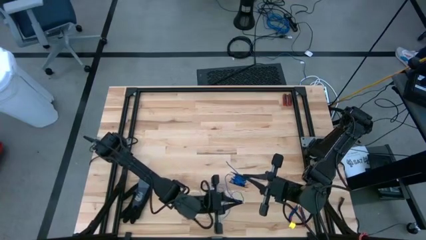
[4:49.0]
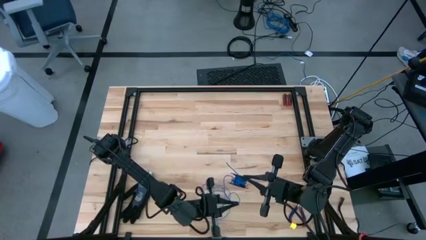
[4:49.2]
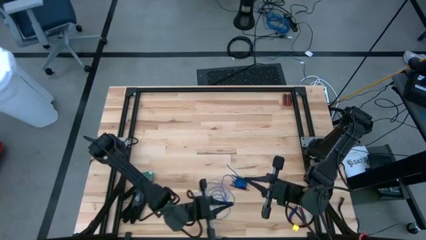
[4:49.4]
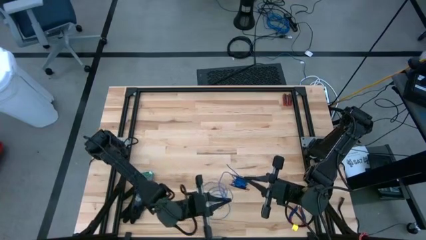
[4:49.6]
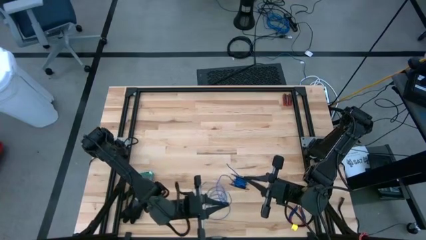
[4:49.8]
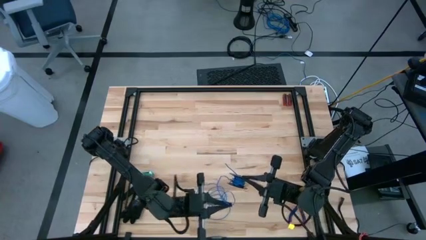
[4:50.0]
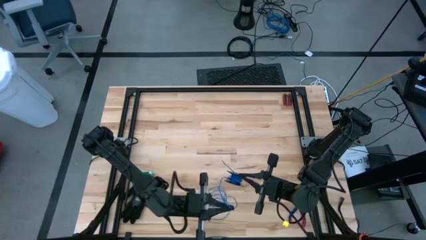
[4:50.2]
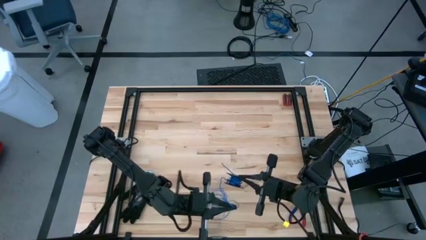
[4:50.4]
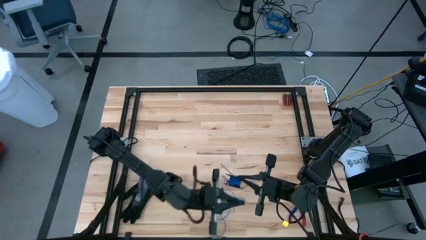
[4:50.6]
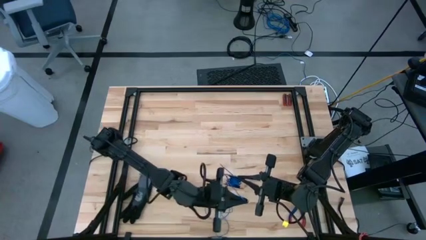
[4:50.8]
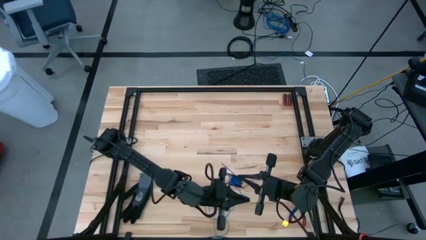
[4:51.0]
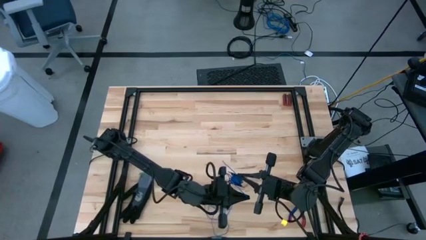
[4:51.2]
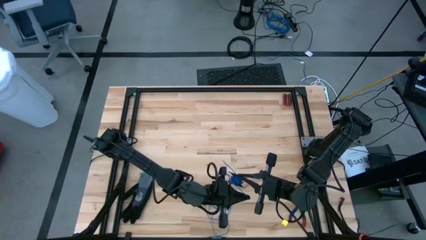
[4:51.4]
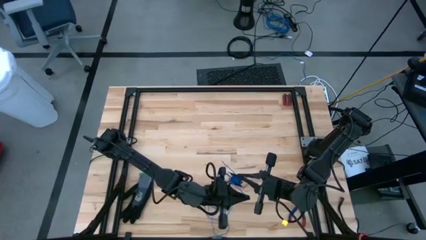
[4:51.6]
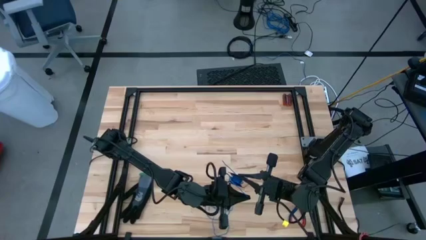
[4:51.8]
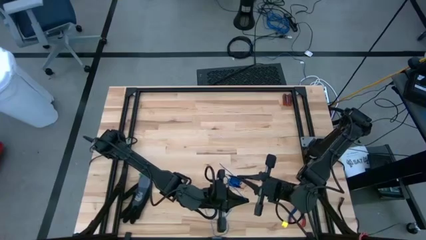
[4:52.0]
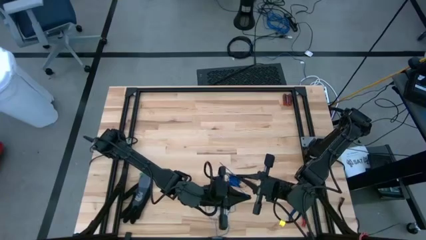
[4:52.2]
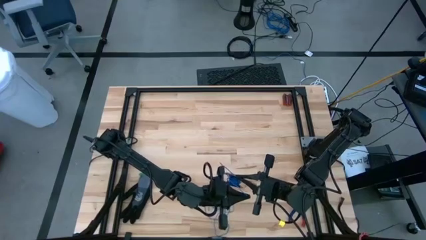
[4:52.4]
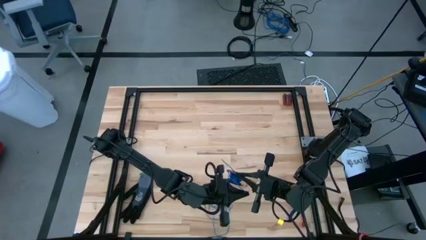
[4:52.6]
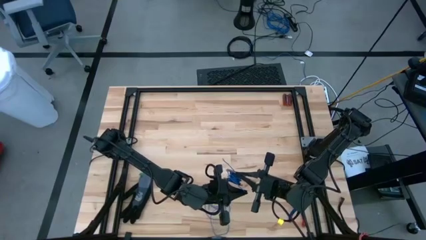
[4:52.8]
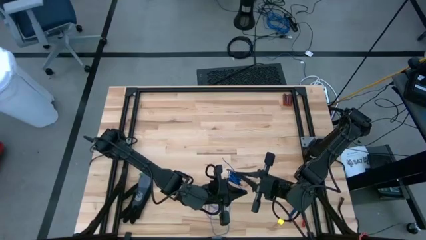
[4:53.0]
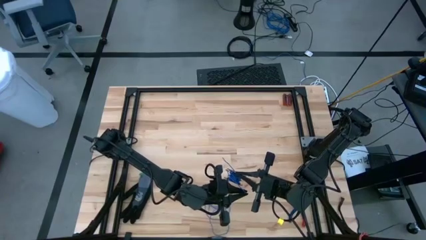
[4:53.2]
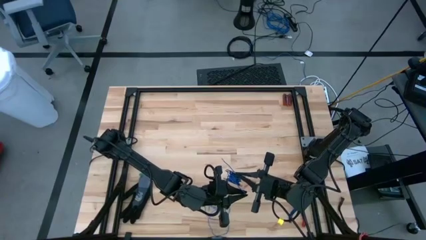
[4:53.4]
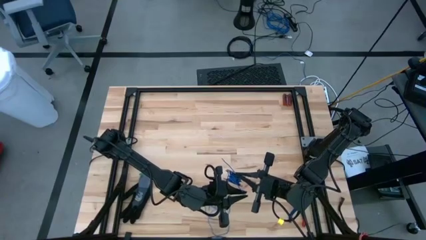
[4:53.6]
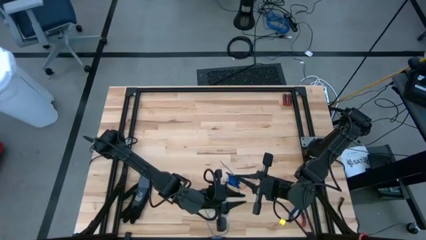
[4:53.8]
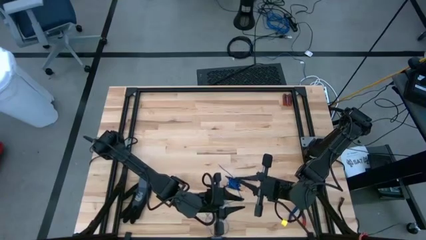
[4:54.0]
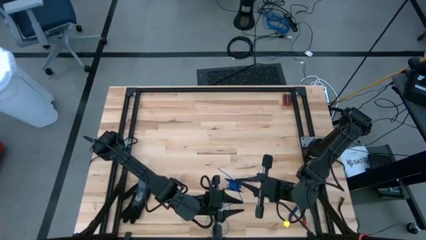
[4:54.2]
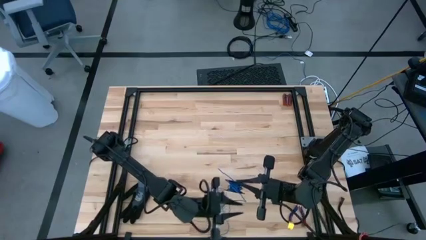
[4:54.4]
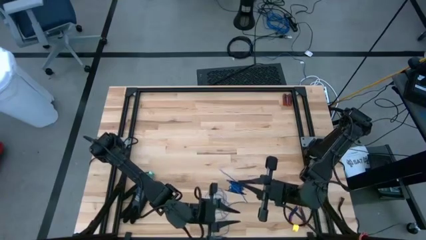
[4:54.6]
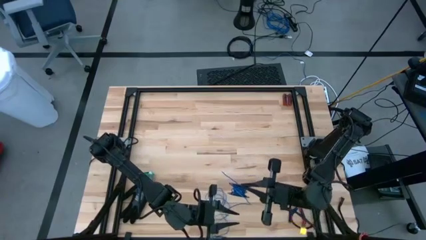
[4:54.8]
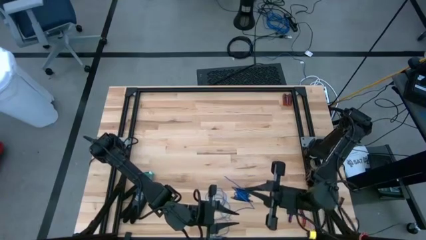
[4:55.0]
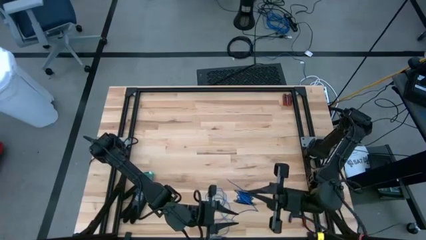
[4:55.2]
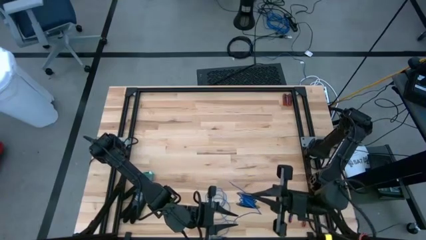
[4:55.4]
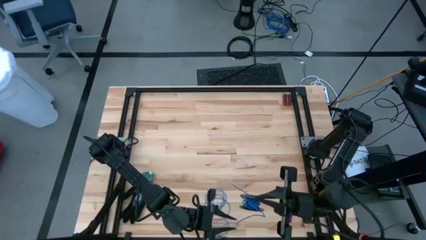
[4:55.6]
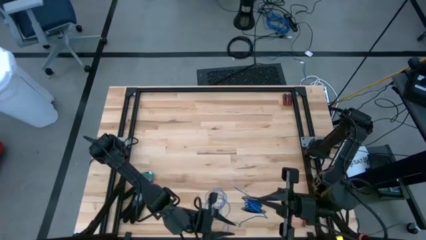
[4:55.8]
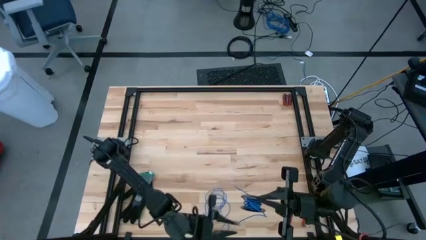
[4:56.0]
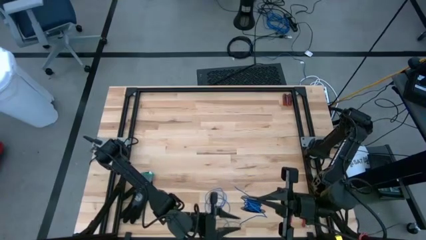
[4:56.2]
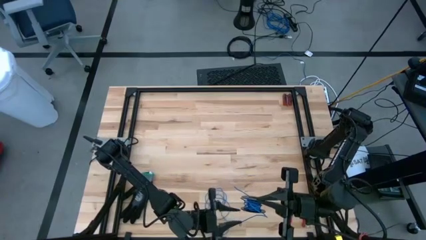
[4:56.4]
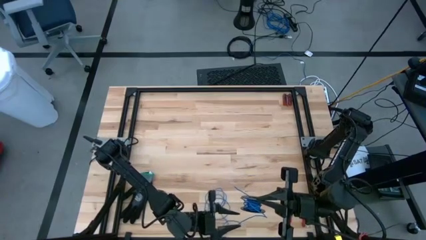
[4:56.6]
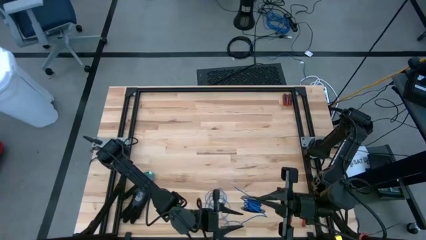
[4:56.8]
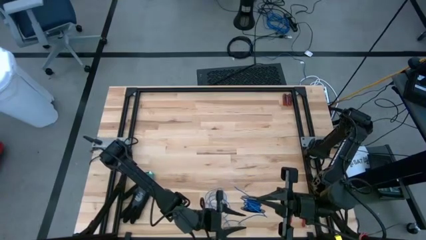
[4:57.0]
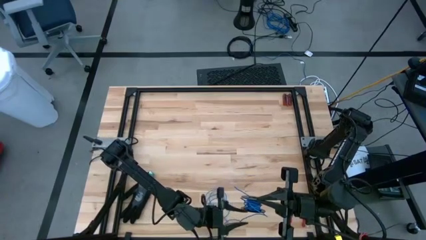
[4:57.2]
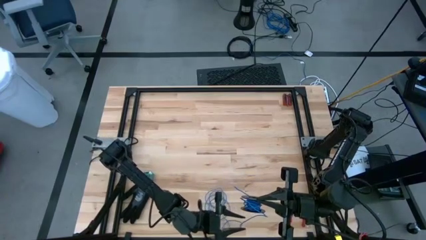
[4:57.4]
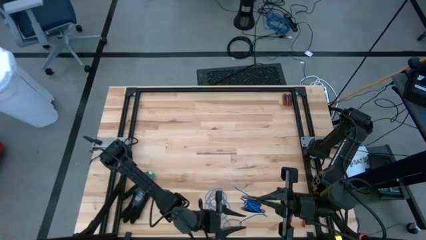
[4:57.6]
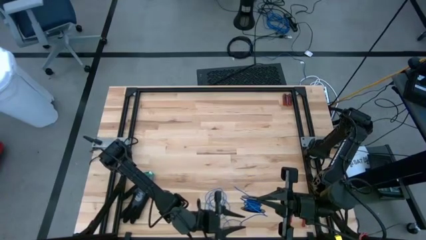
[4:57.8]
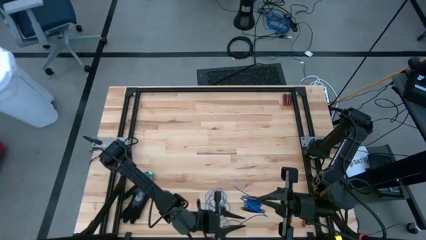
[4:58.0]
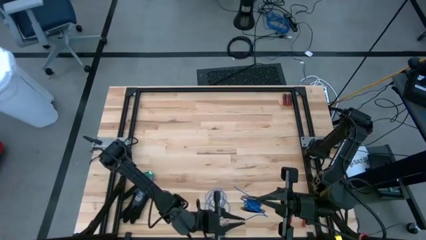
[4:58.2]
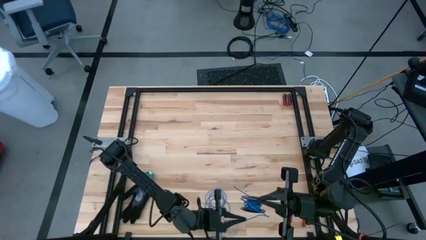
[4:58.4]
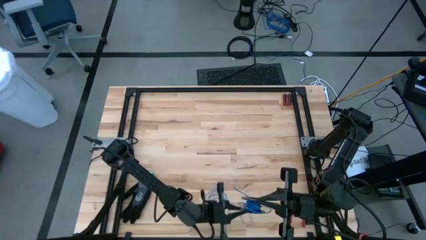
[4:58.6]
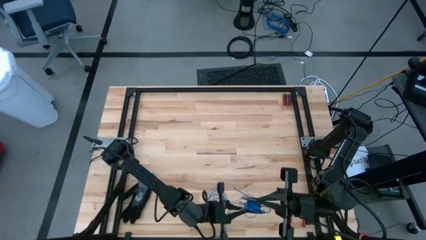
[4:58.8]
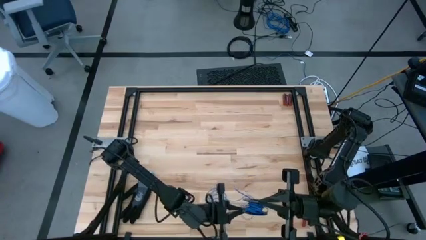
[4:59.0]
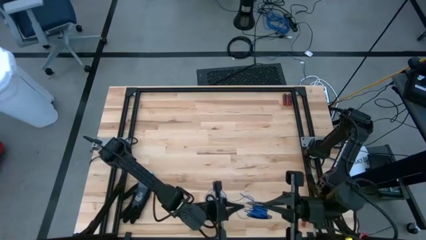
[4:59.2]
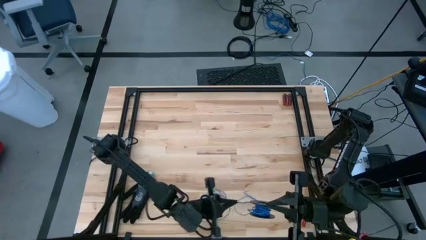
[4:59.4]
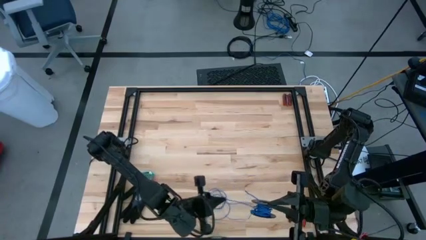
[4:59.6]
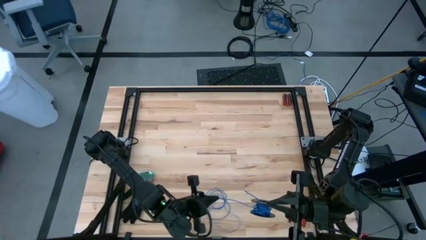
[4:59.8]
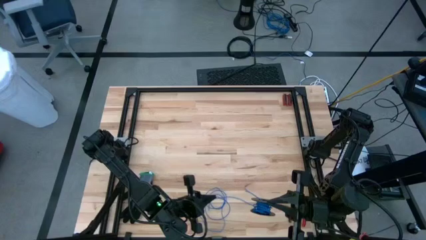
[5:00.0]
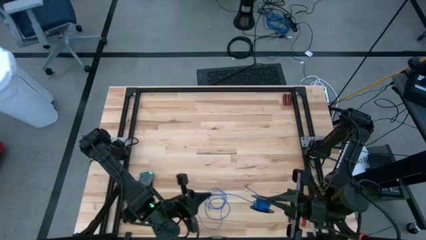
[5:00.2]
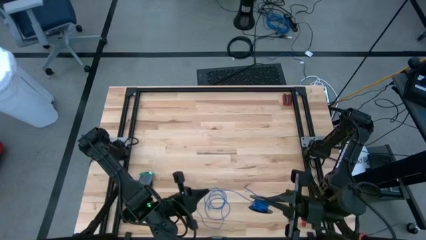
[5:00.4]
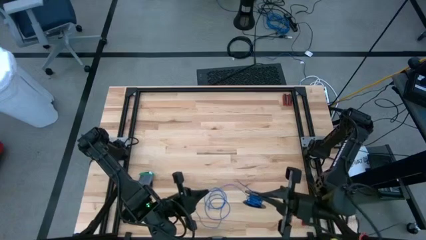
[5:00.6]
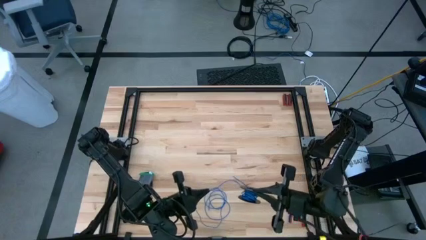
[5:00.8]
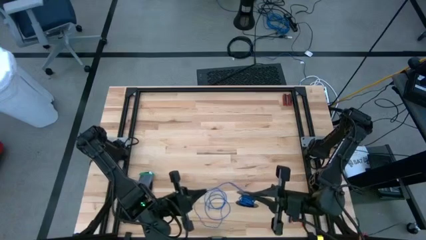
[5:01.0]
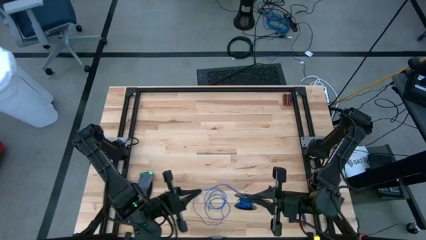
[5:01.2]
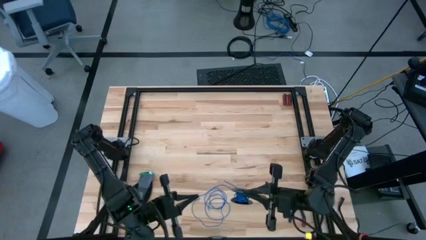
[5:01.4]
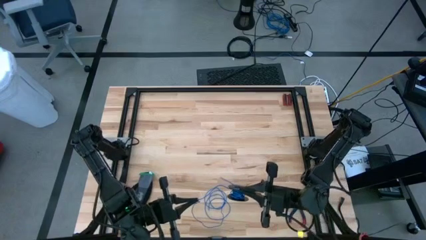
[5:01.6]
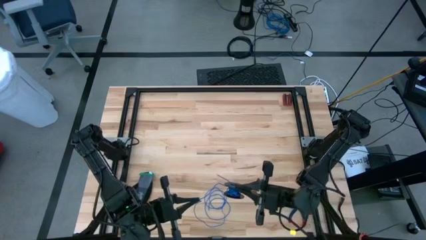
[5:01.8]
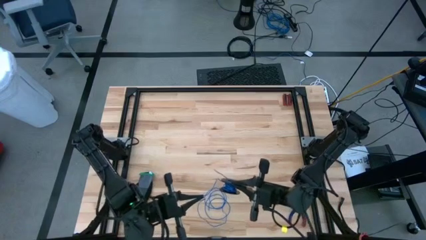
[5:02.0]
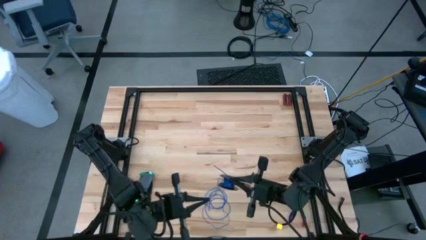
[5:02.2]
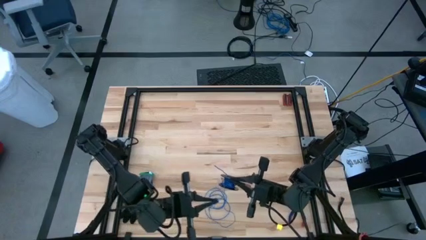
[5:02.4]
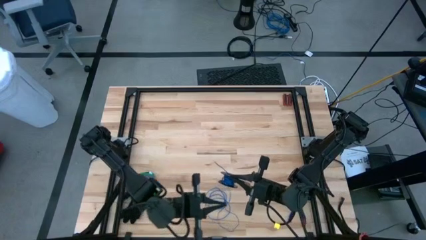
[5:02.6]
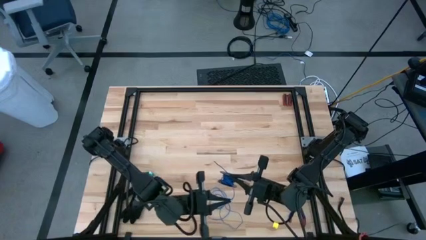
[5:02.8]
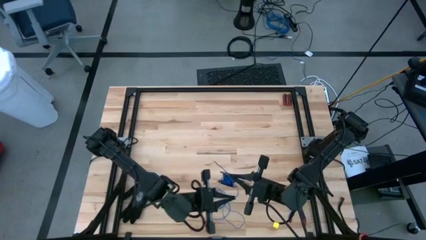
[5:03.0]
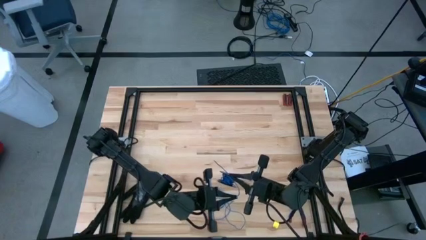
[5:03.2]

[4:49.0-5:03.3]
Task: Coil cords
Coil the blue wire onto the spool

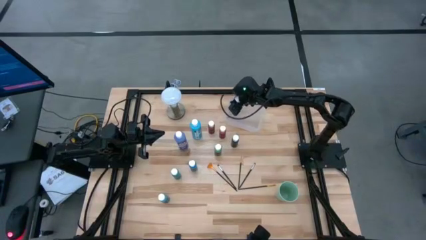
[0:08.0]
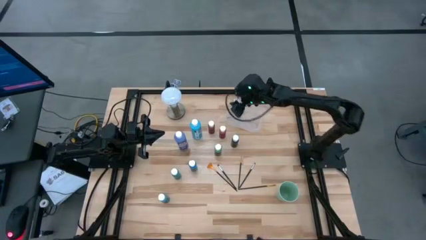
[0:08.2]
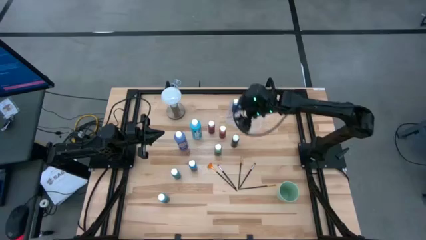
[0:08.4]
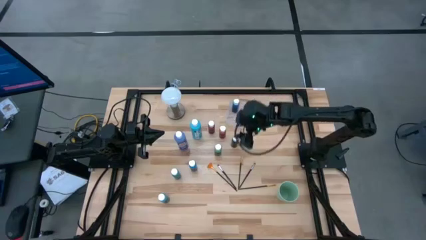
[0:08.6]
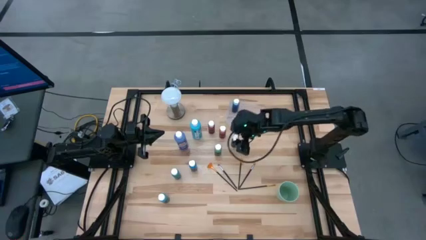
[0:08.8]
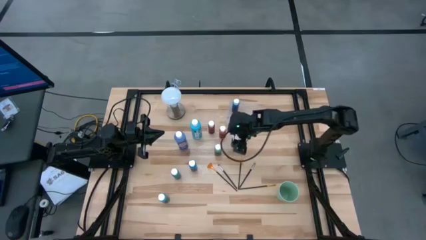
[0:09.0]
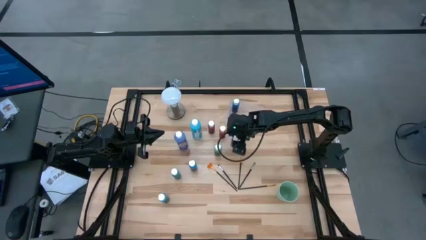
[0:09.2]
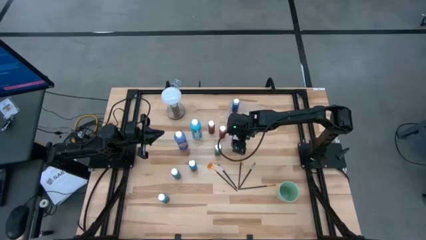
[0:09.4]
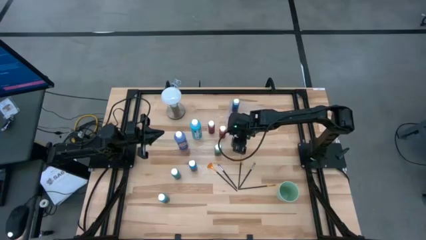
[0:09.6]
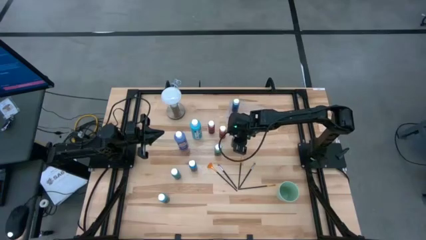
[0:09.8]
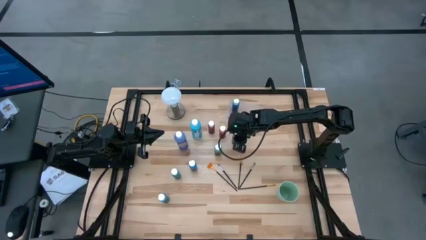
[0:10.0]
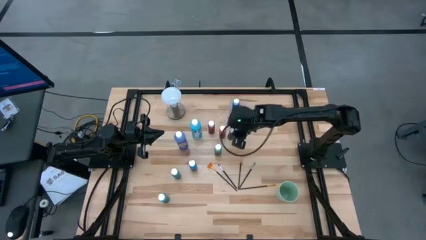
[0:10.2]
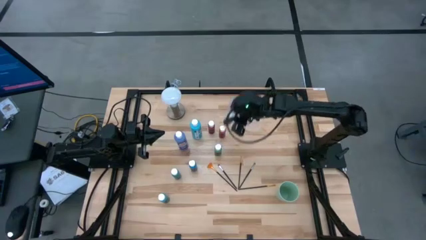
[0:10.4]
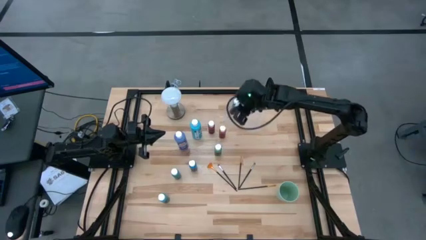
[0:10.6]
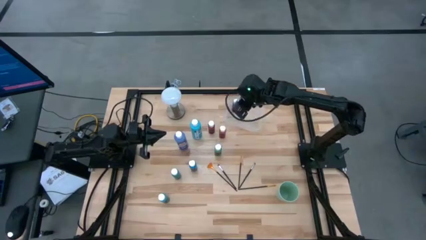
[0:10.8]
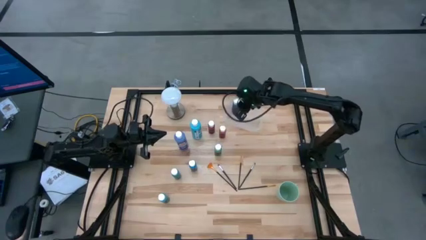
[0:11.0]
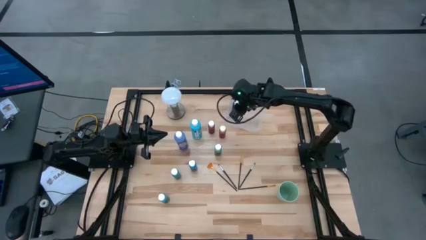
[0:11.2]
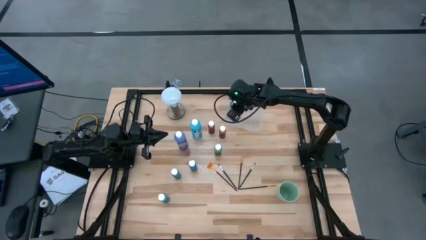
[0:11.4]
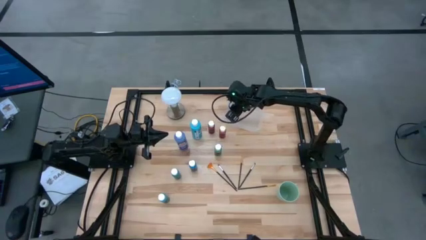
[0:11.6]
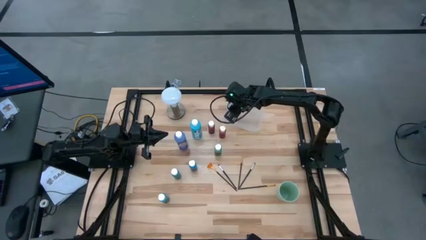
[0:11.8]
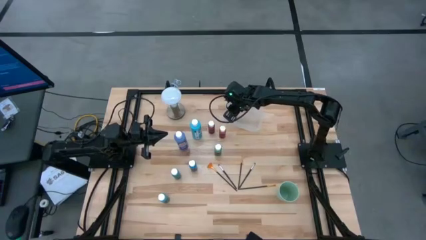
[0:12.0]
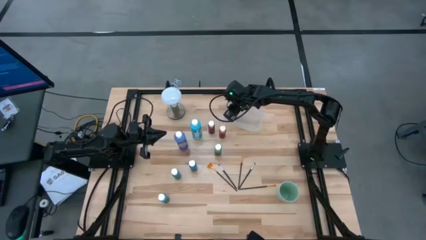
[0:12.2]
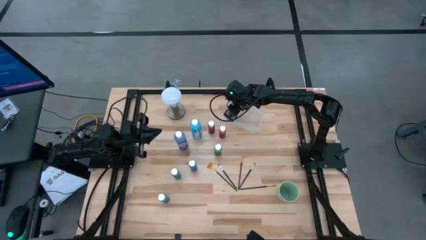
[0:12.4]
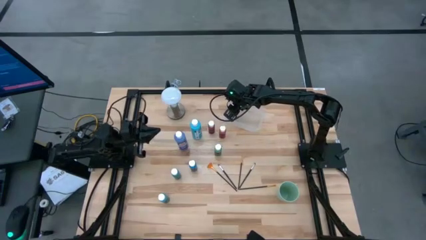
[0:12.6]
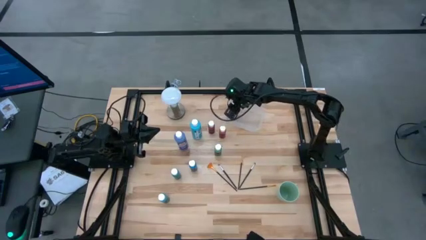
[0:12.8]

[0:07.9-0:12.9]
Task: Pick & Place Paint Supplies
Put the small black paint bottle into the transparent bin
